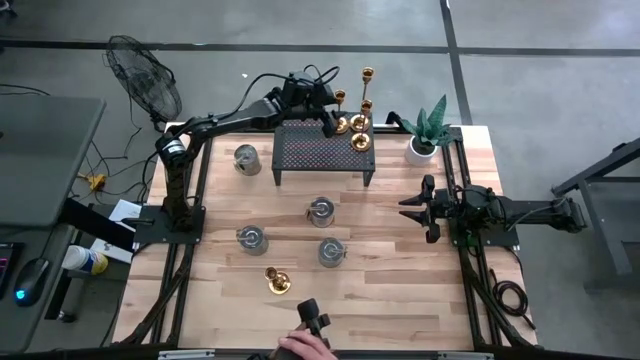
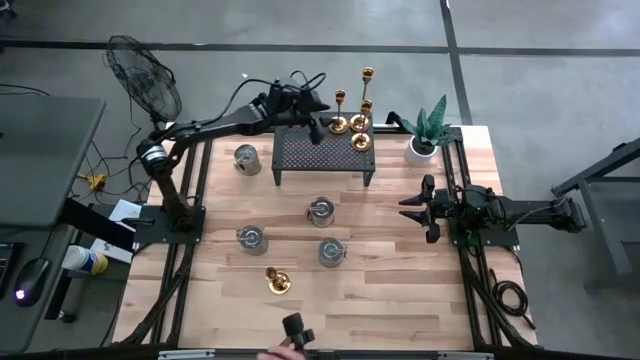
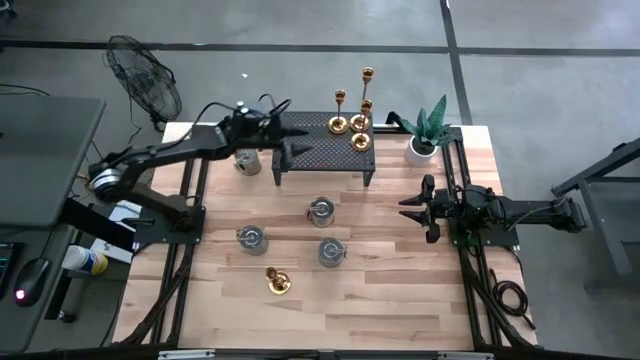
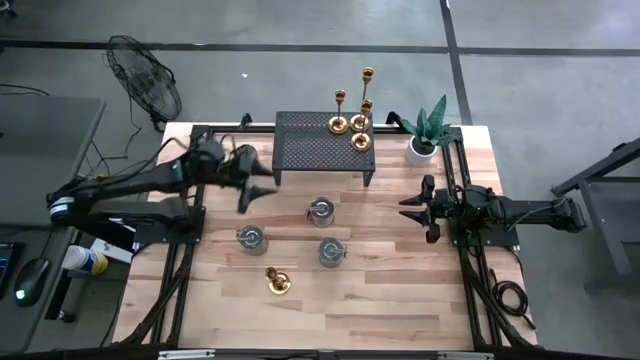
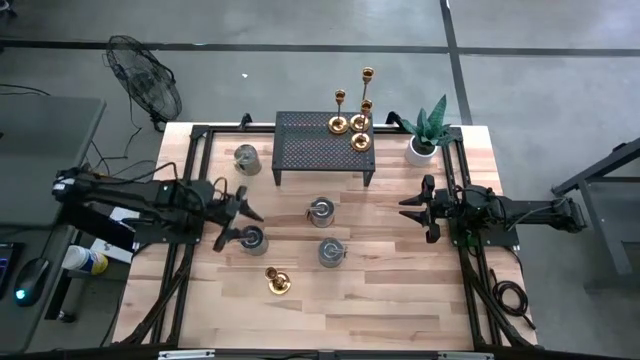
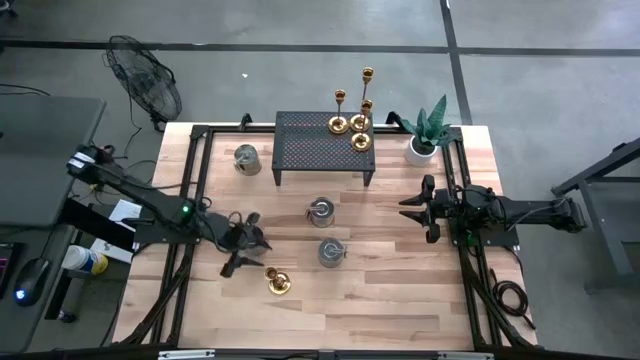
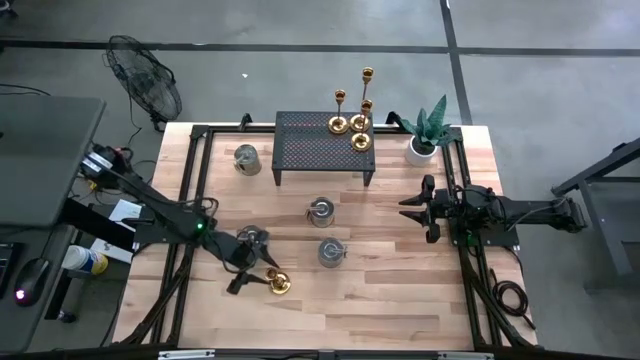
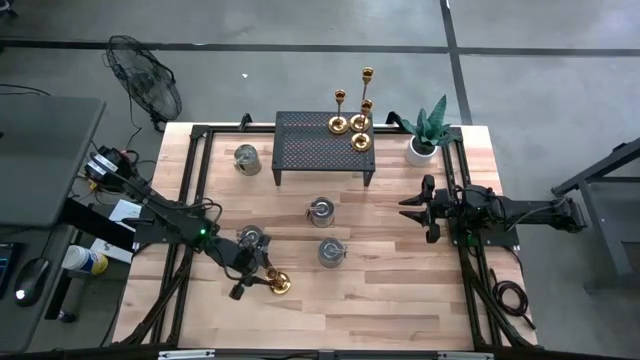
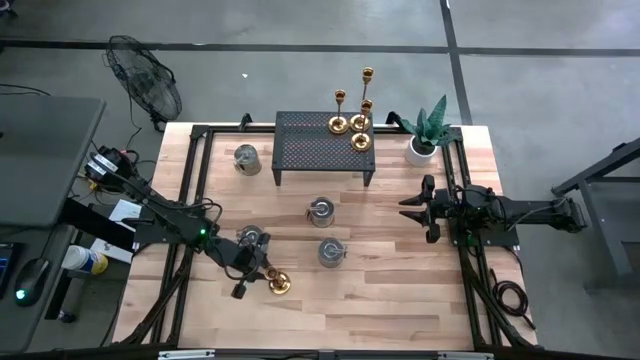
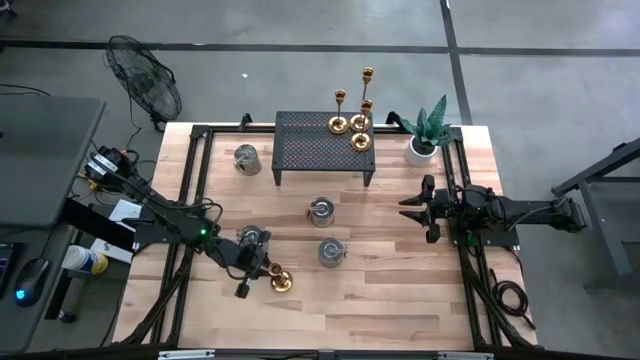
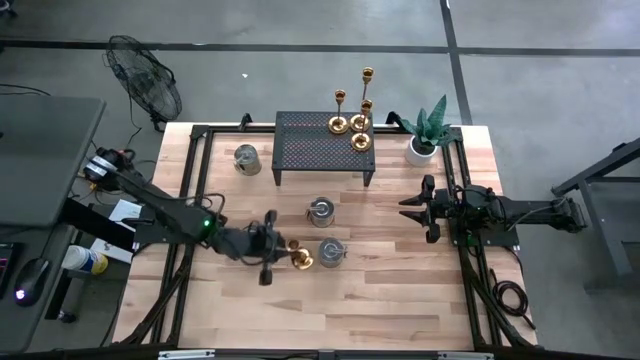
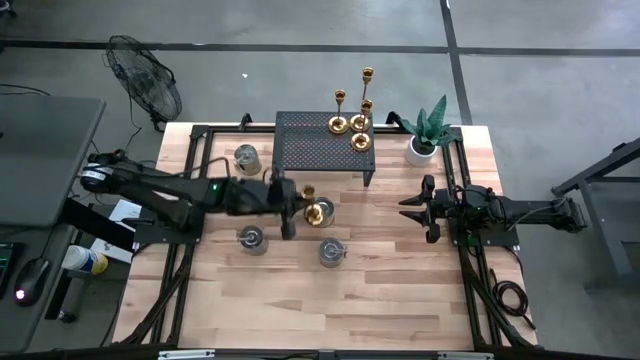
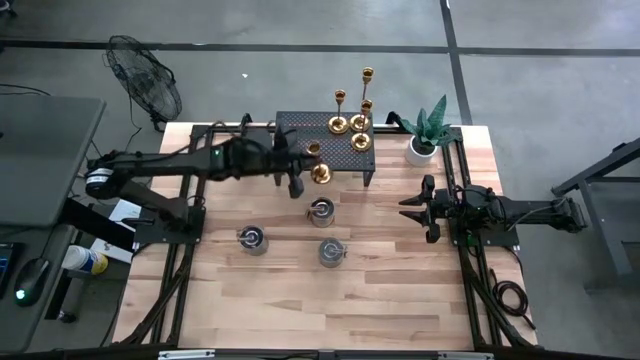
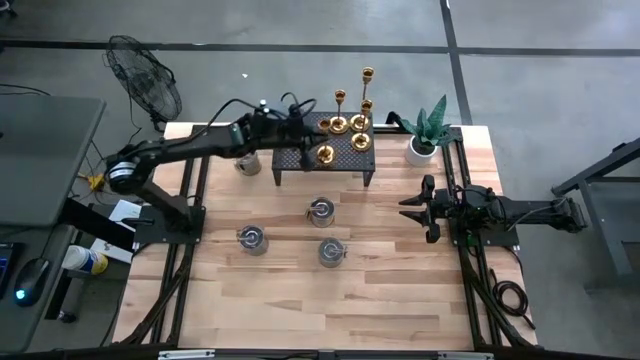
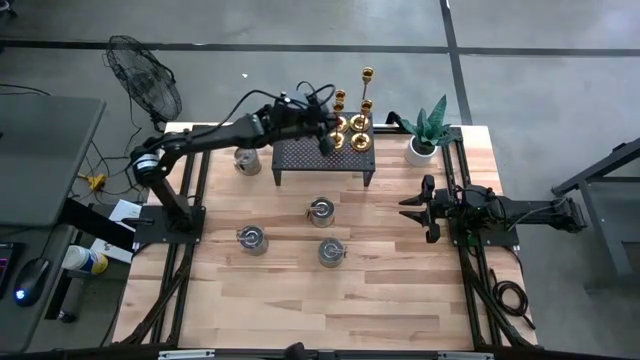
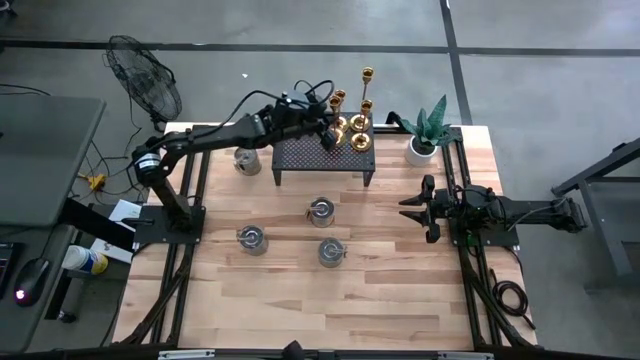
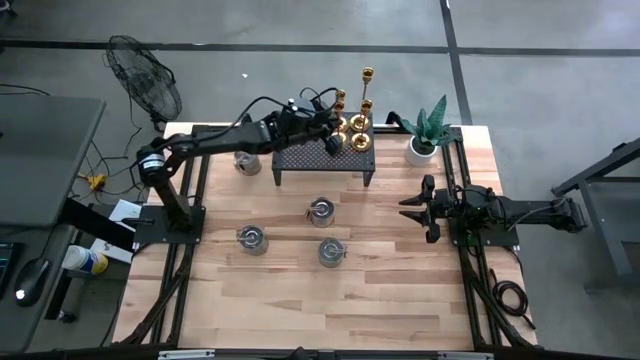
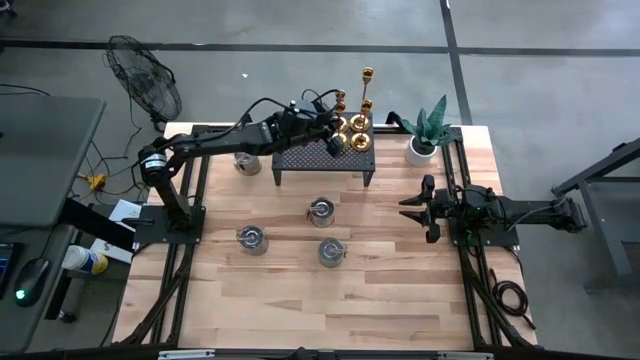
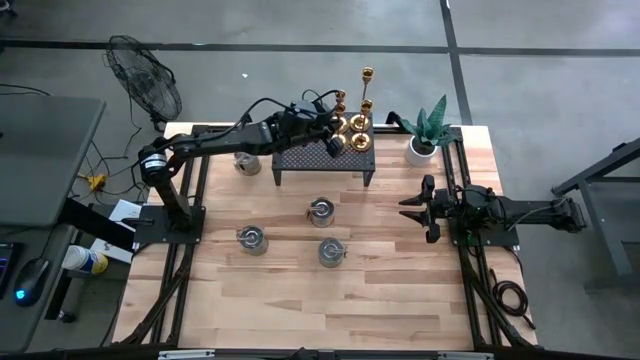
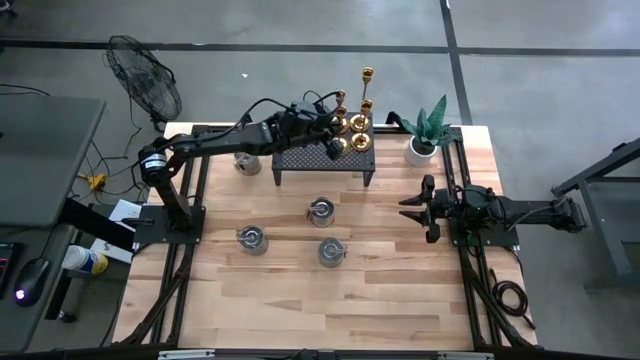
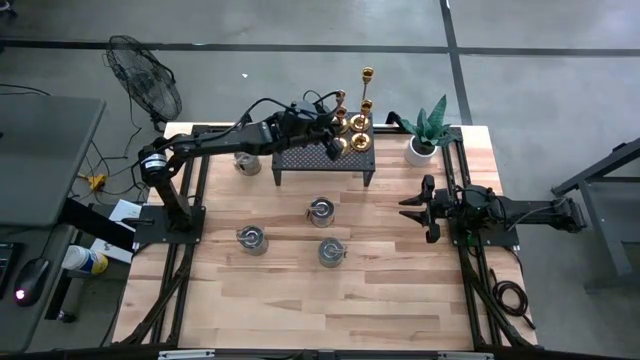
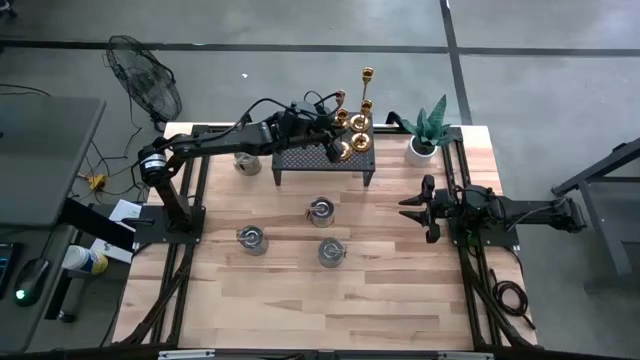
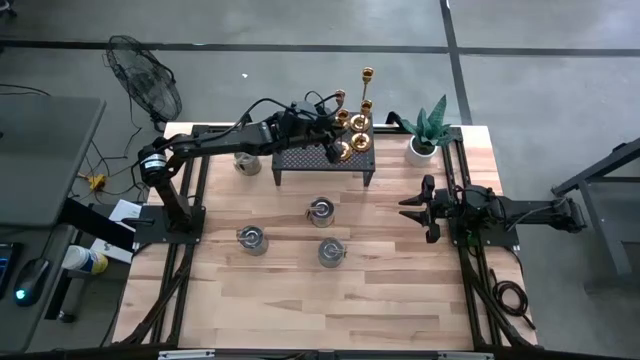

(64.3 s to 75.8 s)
Task: Pick & Place candle stick holders
Put the gold candle holder on the shelf

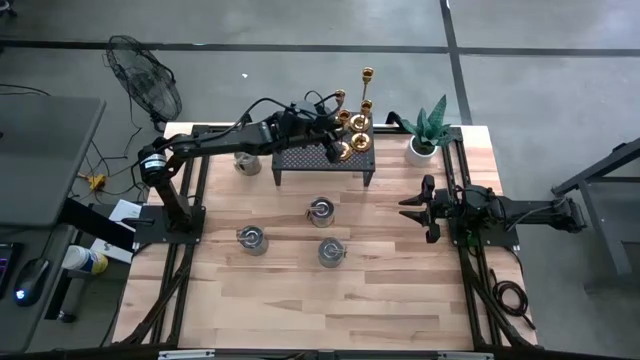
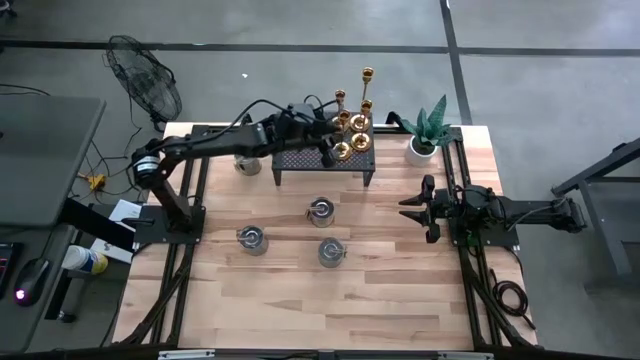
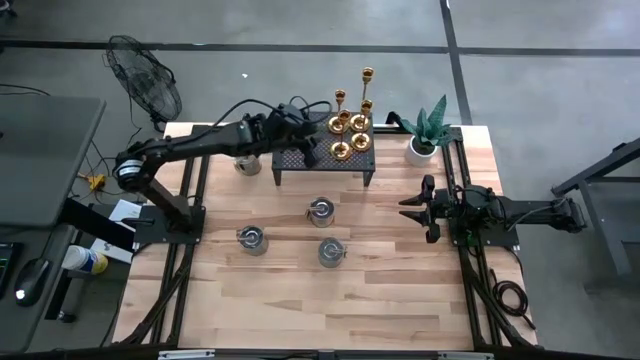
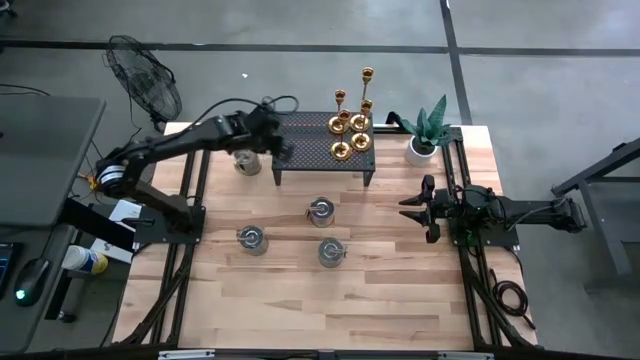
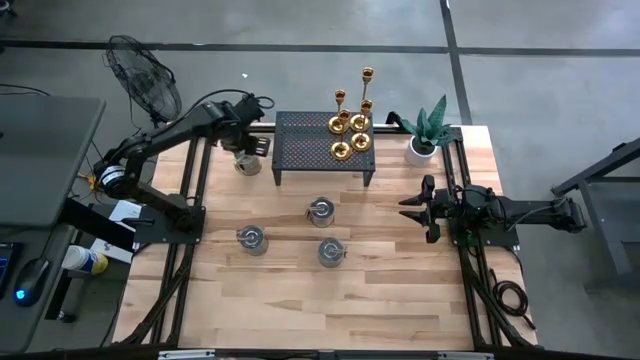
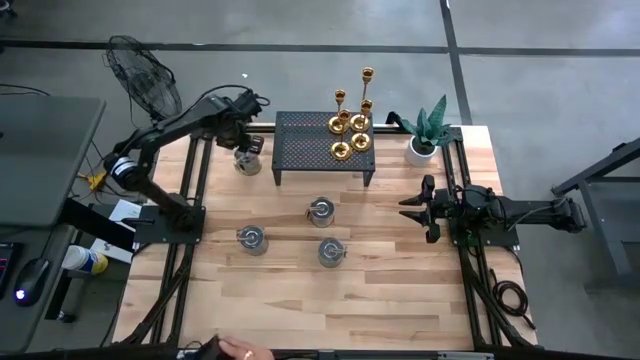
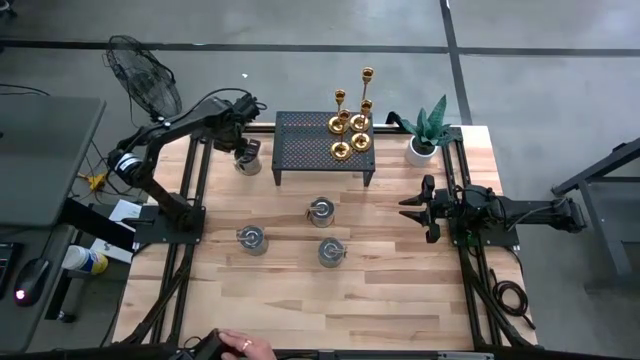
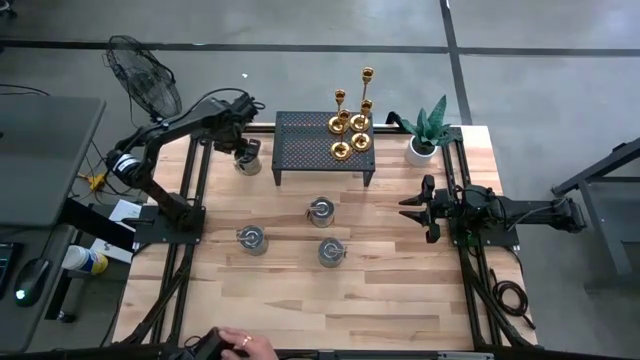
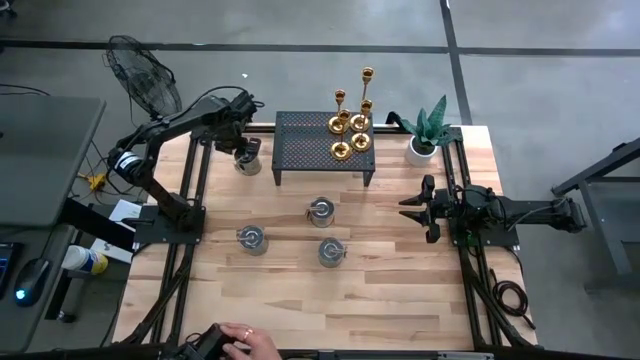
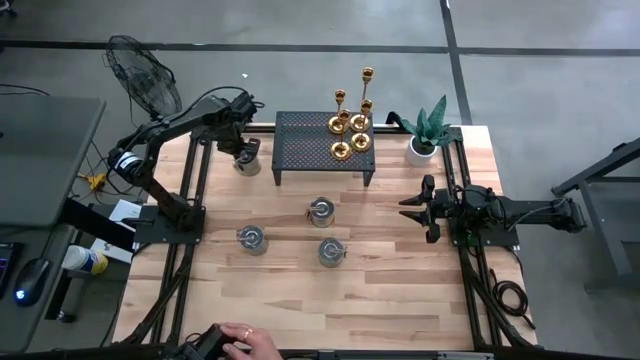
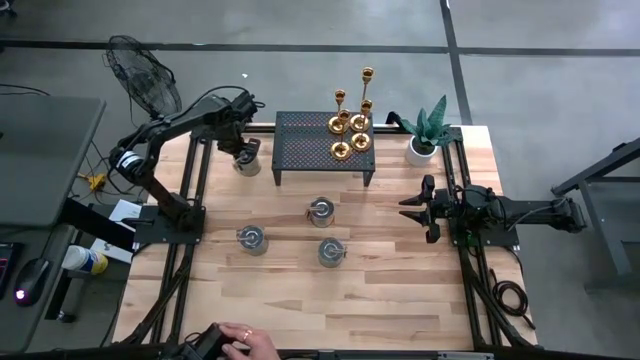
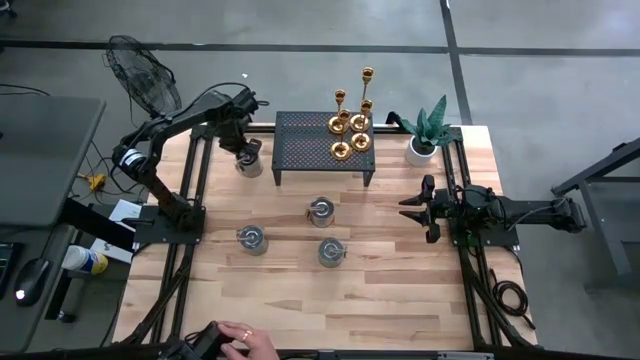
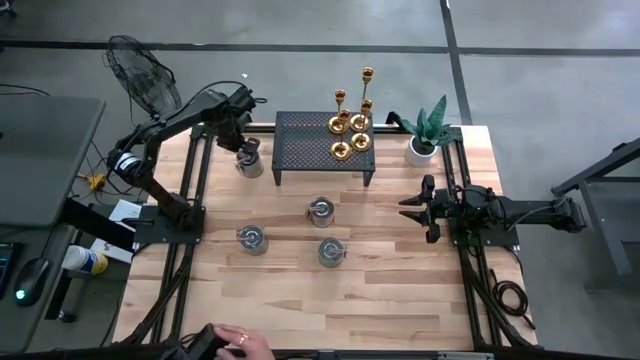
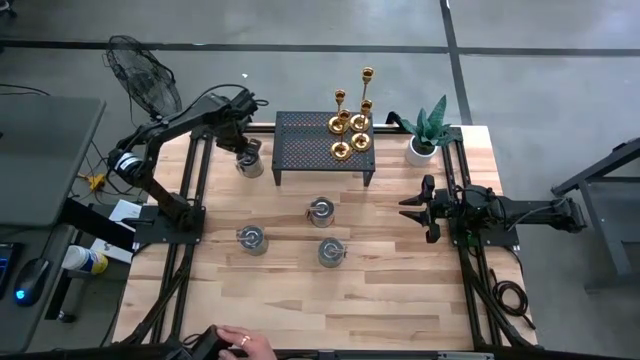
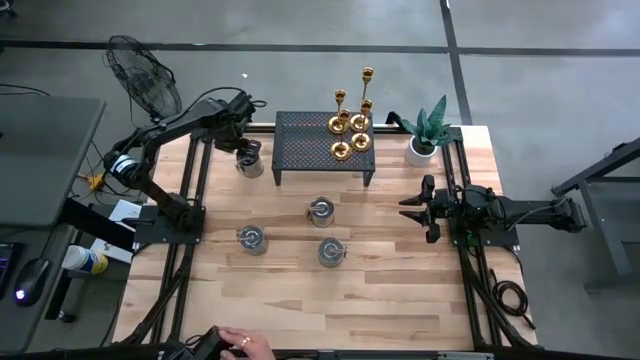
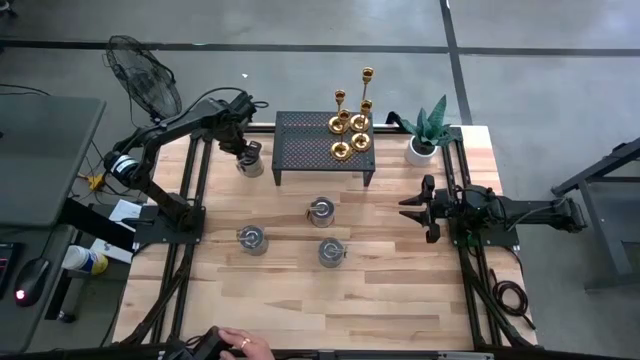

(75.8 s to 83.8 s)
Put the scented candle on the shelf
